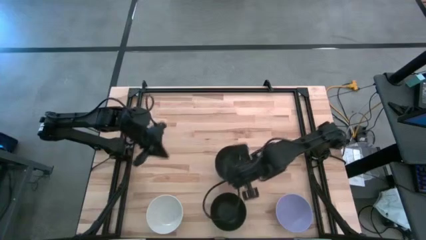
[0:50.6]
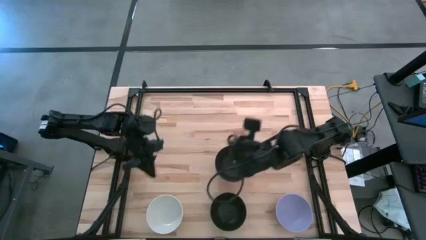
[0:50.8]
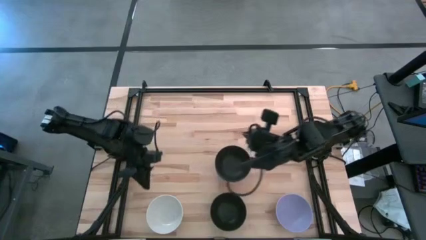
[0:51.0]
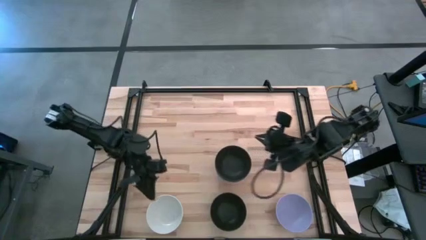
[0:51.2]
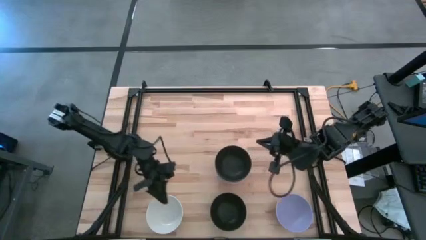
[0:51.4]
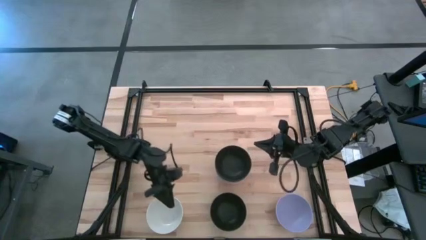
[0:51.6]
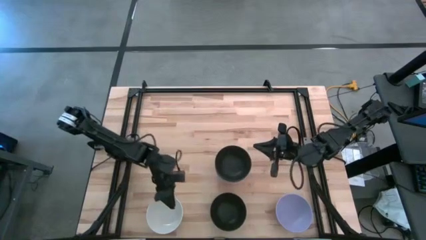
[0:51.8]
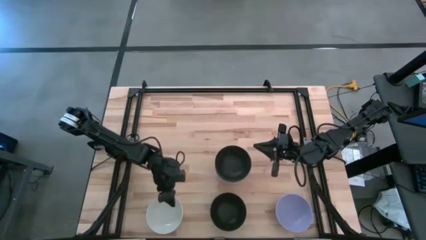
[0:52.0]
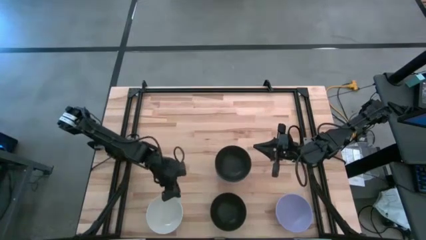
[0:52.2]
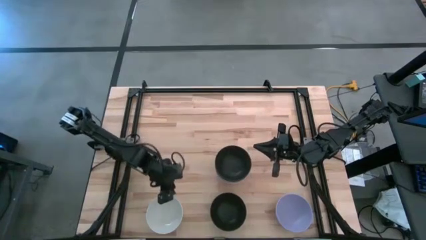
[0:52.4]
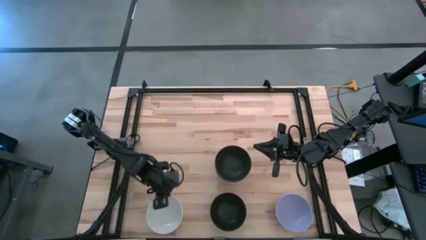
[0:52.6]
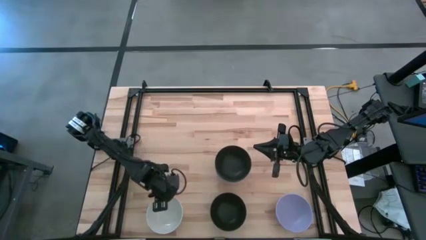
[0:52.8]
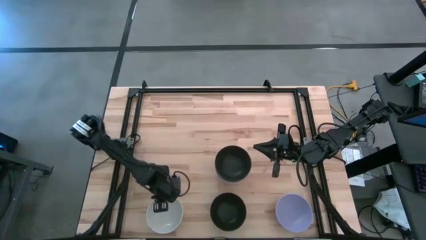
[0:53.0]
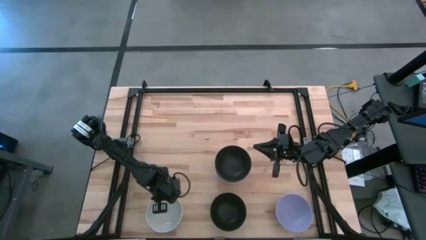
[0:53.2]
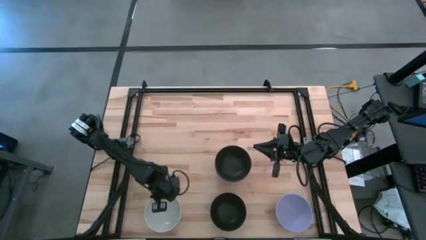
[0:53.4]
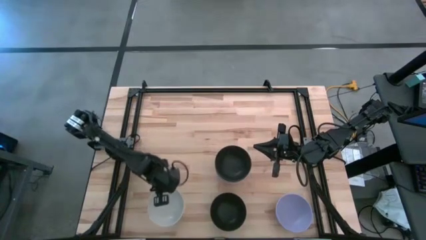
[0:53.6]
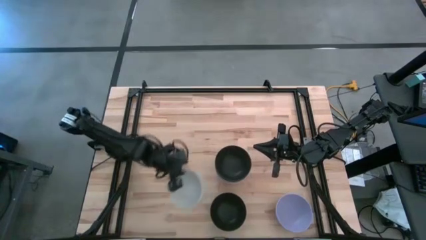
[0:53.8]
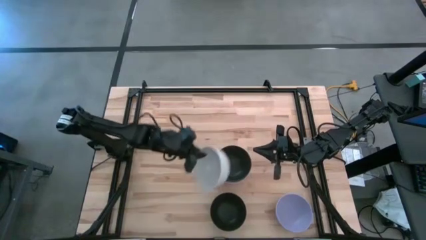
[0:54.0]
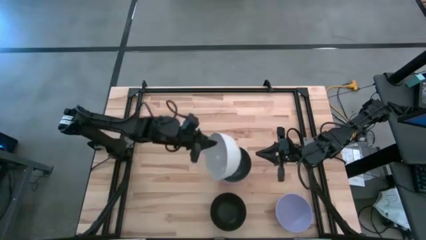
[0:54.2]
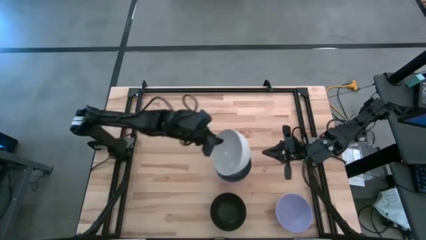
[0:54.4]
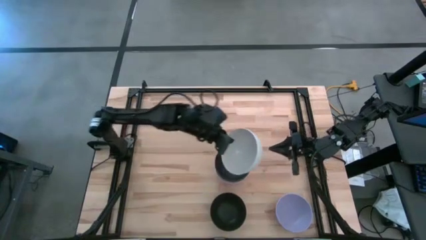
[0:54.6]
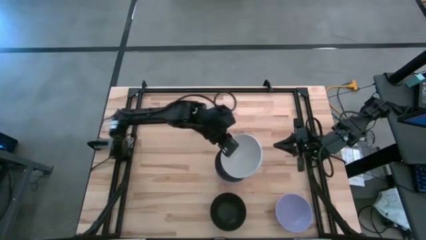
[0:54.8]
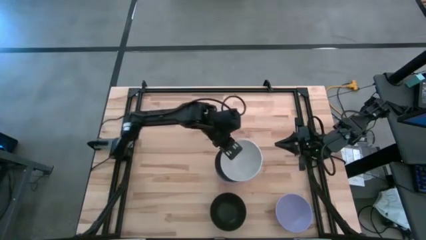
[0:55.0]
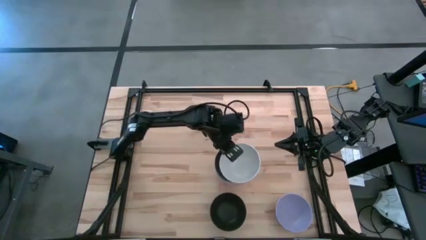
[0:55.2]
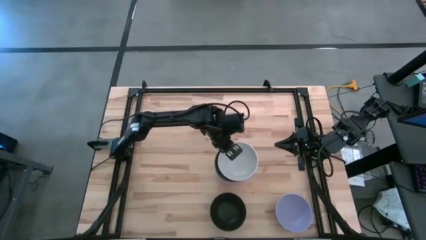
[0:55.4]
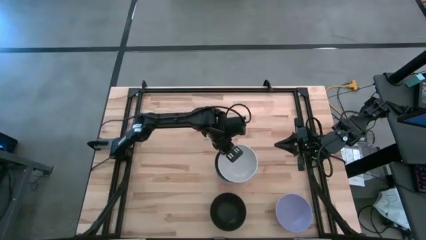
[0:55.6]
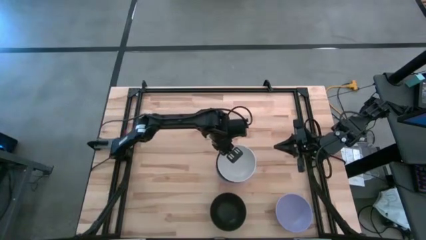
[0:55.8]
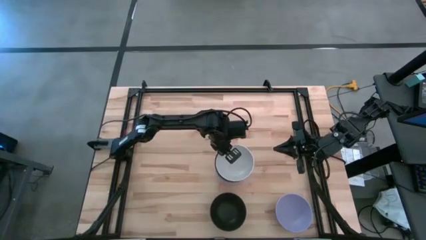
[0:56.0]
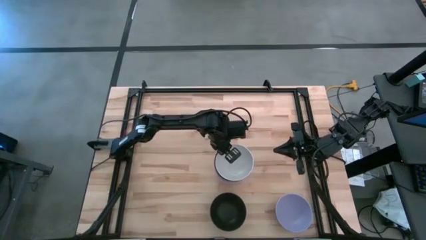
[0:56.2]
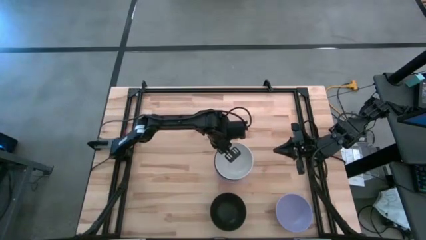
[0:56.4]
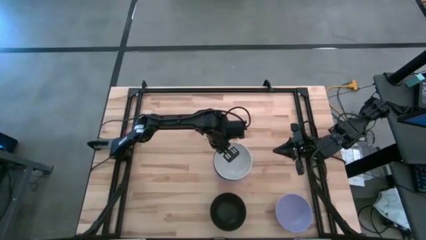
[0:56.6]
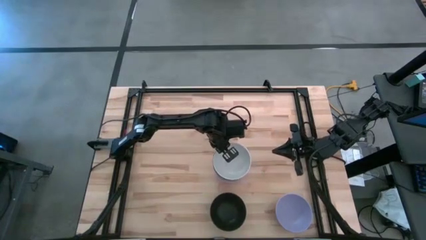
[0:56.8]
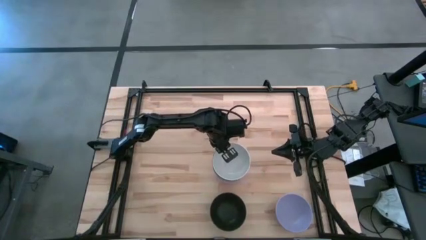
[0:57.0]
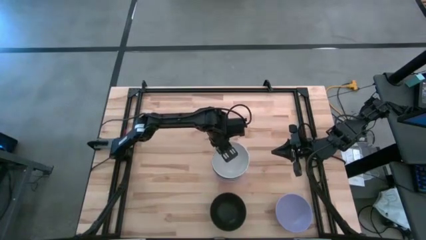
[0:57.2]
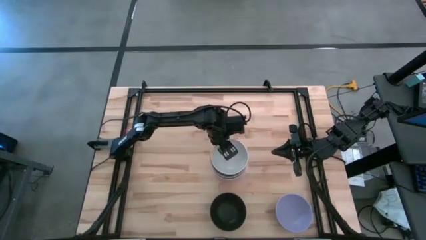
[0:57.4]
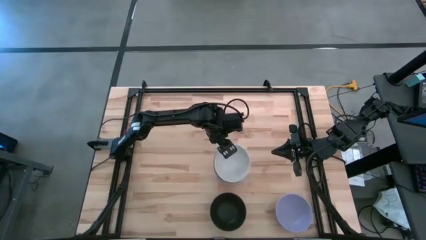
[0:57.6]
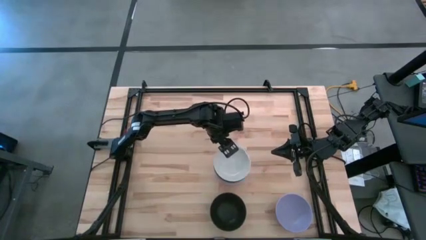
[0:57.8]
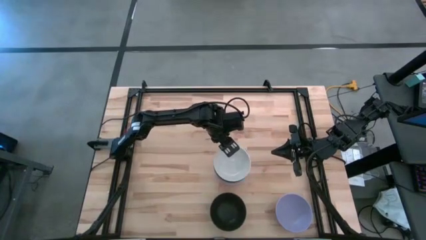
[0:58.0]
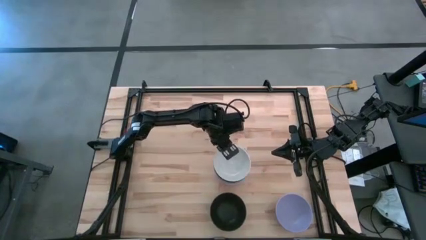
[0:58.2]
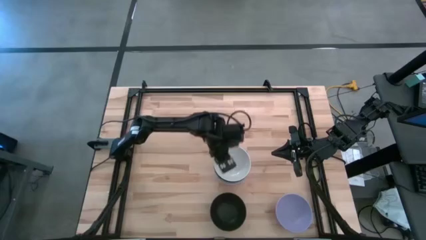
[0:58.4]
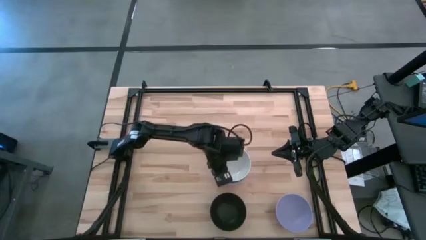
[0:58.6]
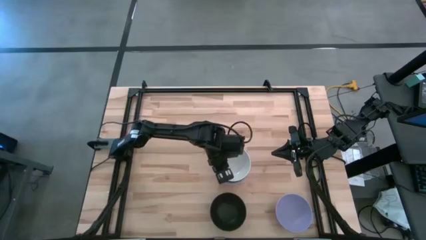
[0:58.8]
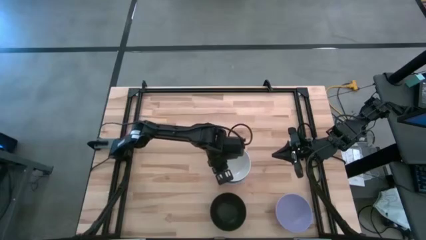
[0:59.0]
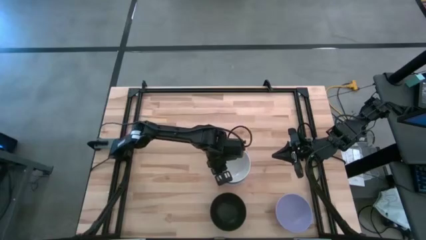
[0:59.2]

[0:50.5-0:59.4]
Task: Nest bowls inside each other
Stack the white bowl on top of the black bowl

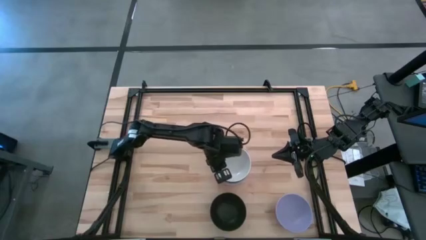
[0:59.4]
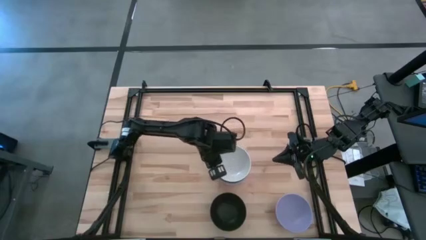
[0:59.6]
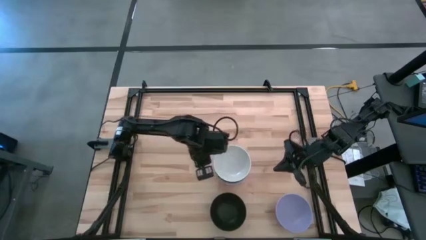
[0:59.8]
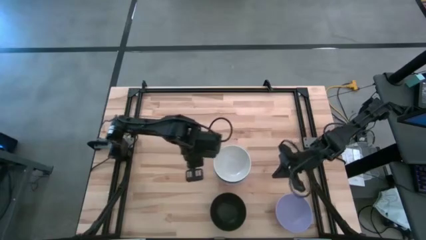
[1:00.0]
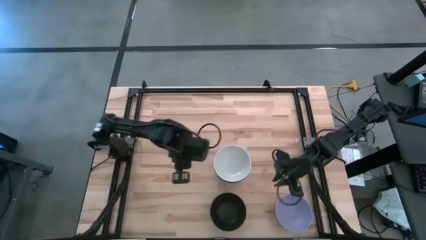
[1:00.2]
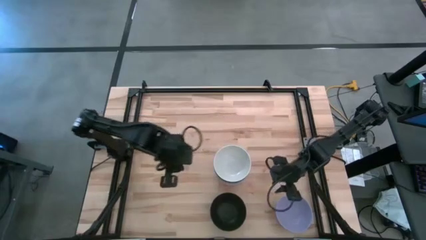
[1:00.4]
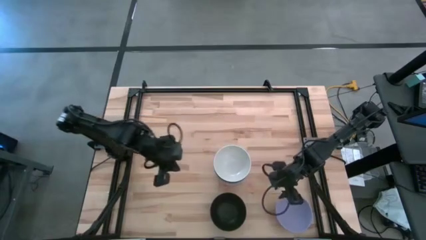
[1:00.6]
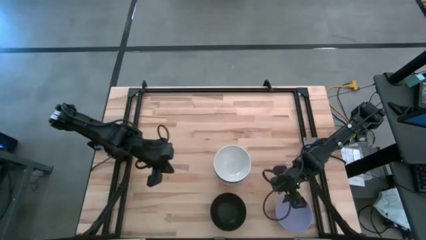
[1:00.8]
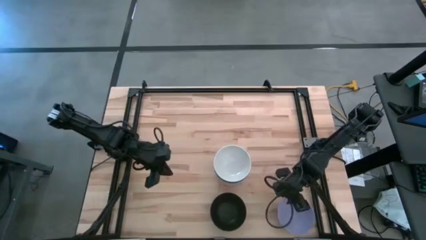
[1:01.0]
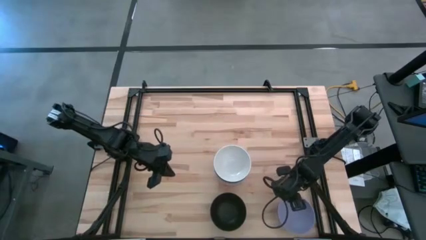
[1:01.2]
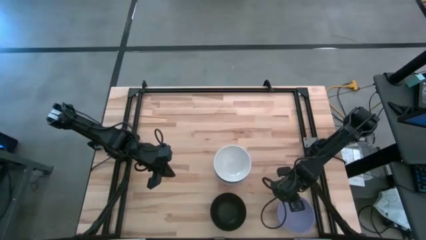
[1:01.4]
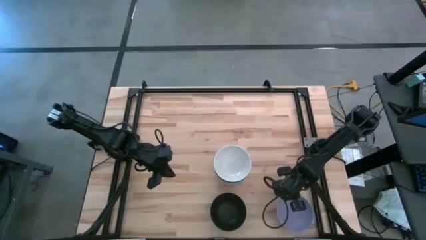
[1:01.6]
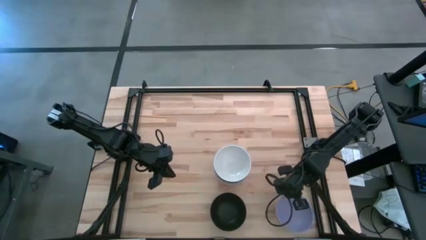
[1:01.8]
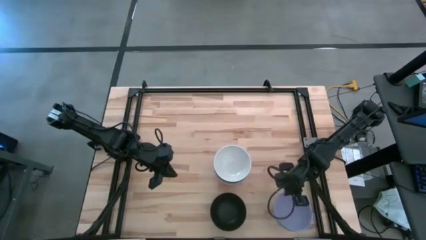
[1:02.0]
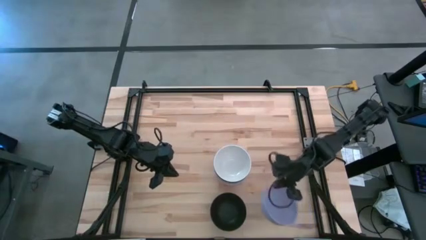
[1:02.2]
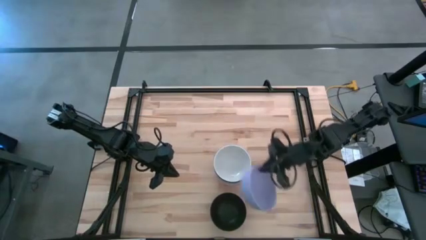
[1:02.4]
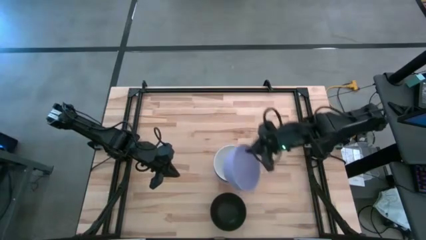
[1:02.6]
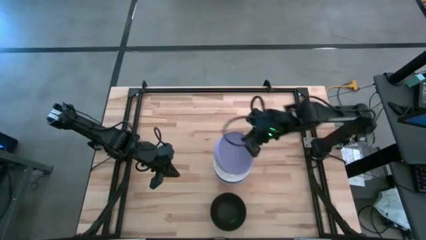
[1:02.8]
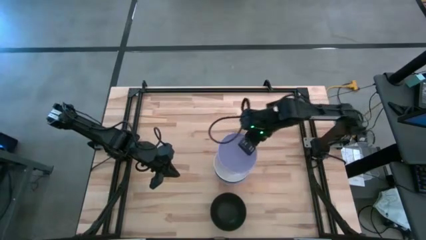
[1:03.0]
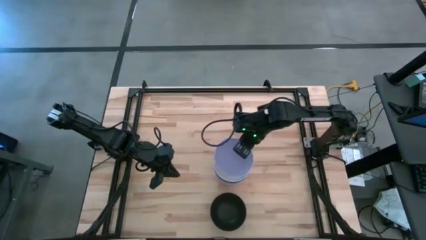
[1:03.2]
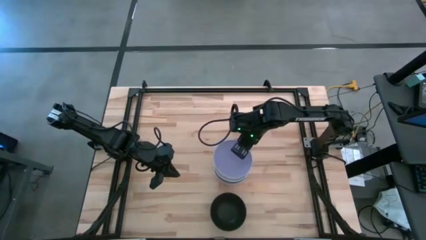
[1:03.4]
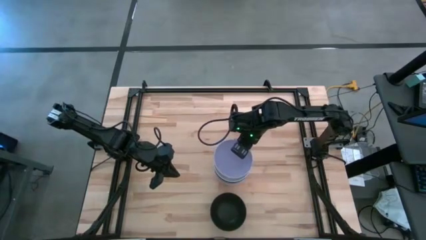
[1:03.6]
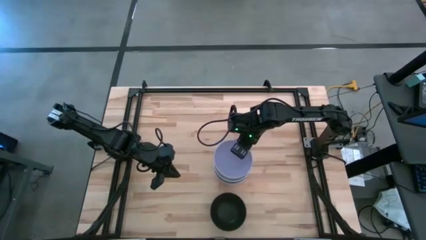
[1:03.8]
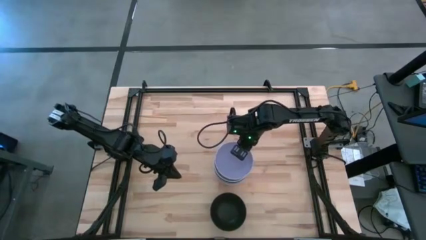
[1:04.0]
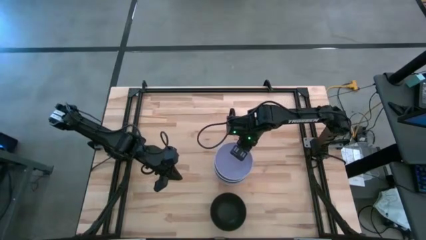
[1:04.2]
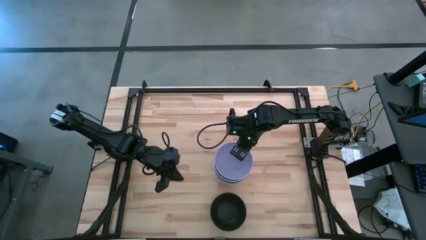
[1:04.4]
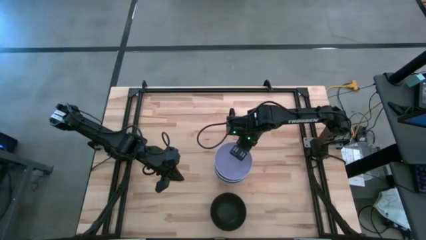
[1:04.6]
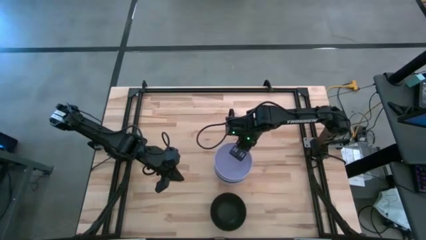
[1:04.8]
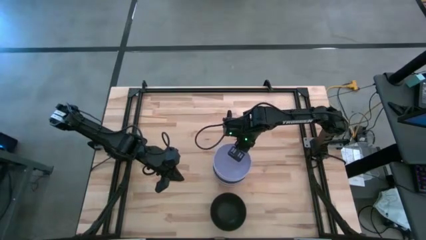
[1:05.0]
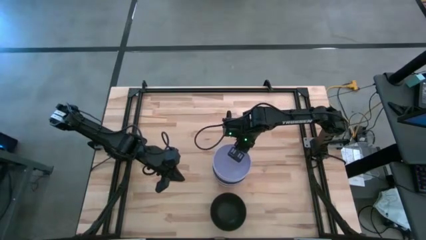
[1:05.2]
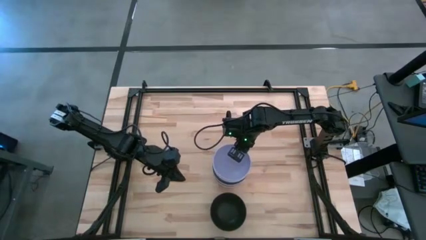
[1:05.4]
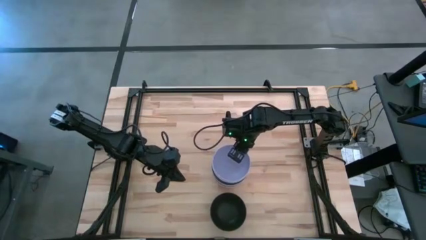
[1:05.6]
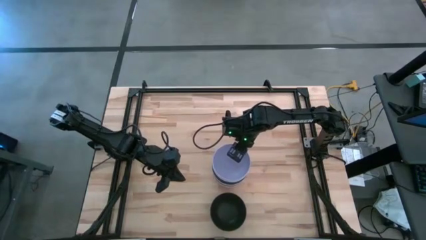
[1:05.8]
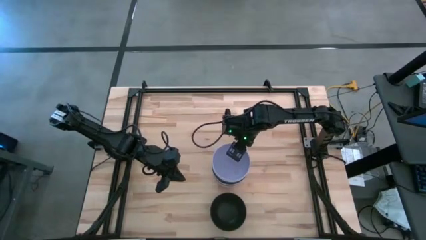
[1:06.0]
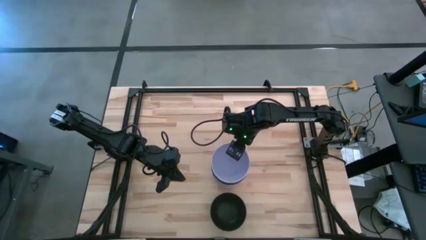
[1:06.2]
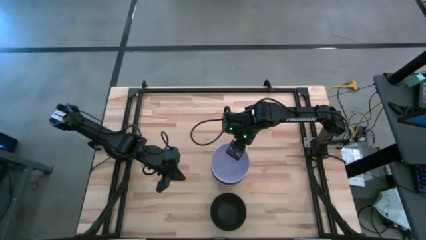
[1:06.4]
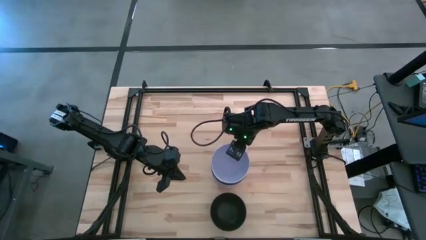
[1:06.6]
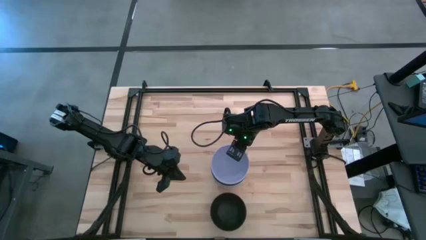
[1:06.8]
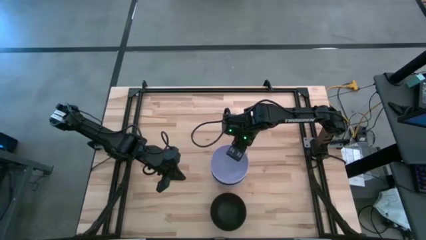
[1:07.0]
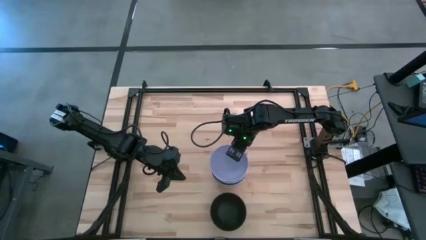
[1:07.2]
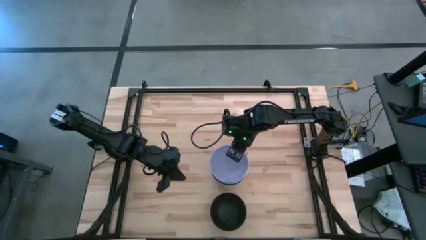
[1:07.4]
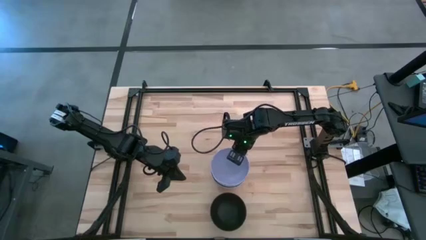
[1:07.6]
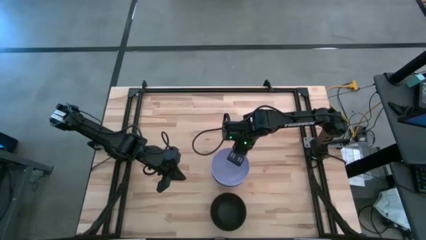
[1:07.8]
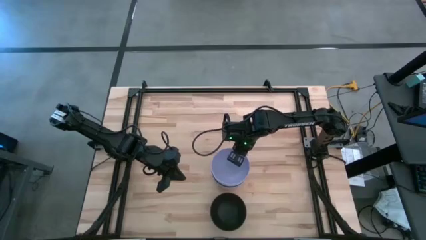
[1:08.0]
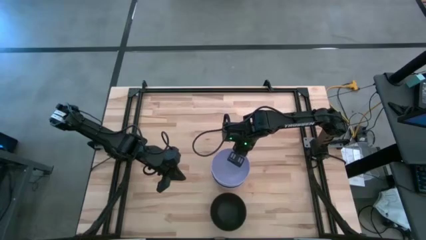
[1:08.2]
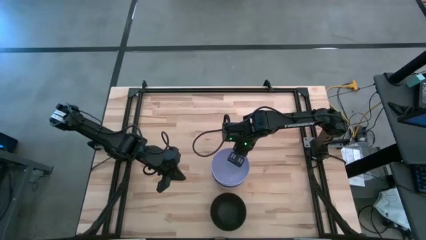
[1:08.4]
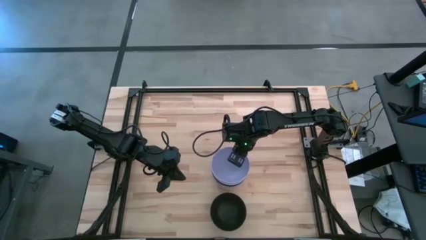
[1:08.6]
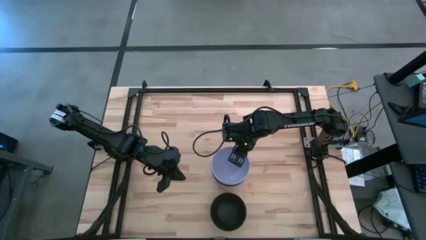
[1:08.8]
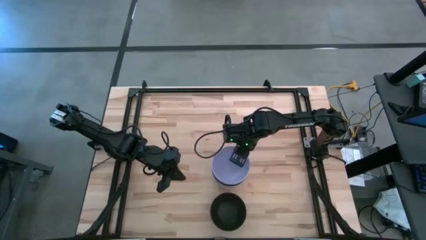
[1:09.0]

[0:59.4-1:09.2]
Stack the purple bowl on top of the white bowl
